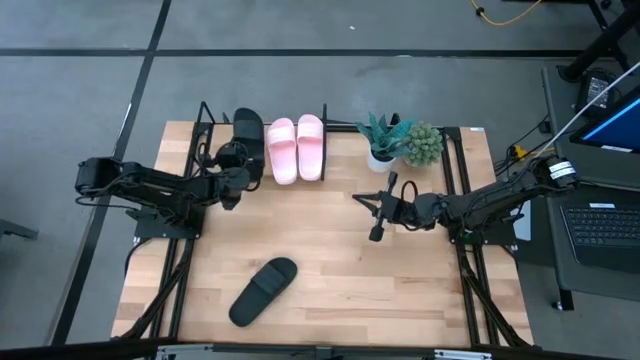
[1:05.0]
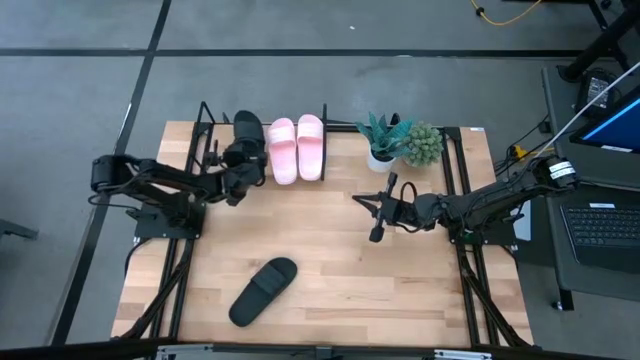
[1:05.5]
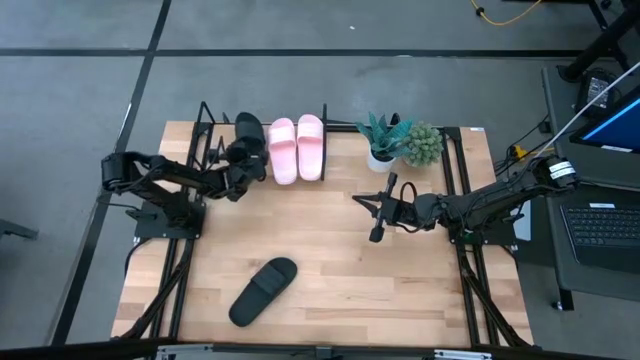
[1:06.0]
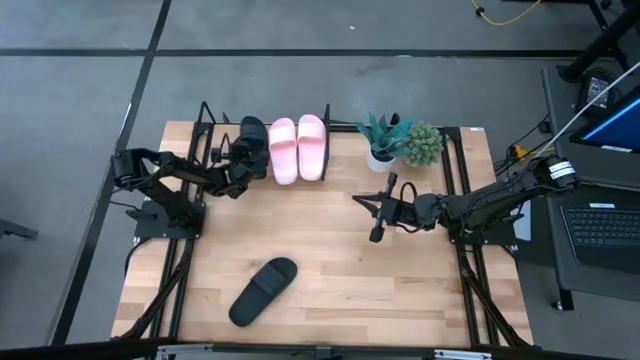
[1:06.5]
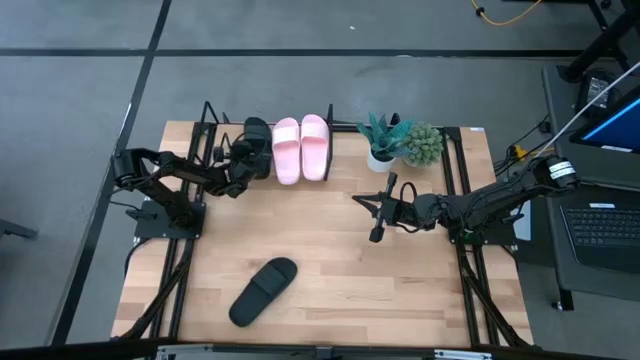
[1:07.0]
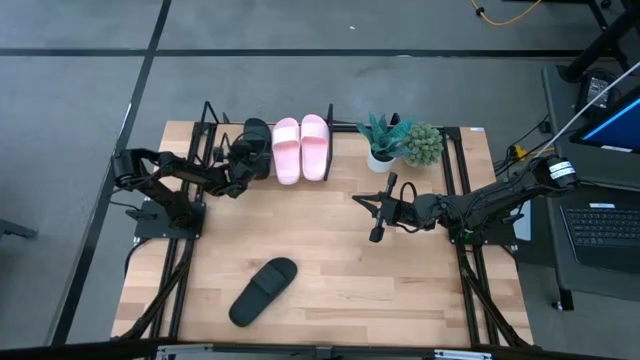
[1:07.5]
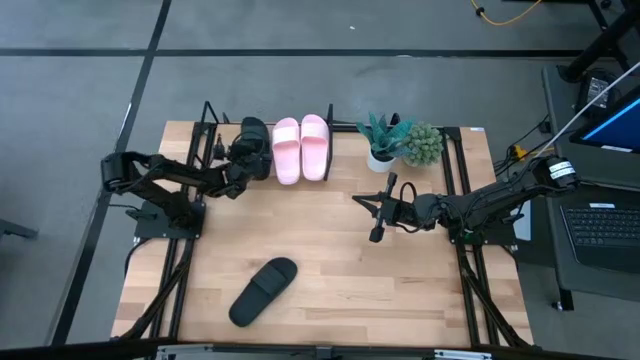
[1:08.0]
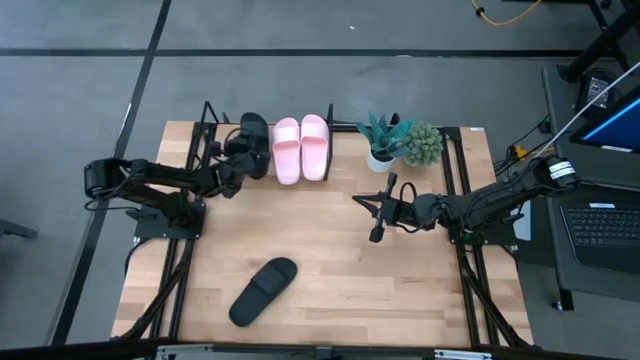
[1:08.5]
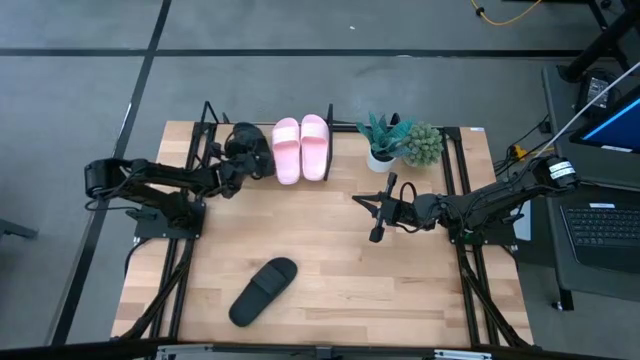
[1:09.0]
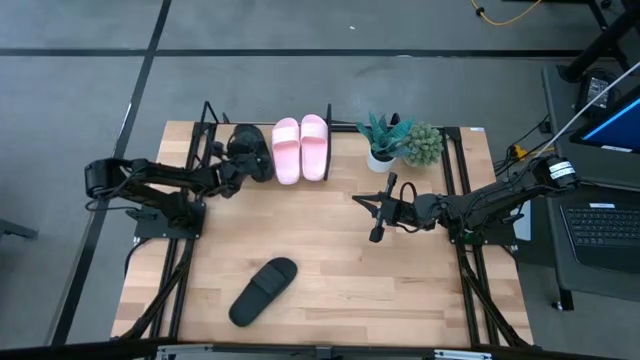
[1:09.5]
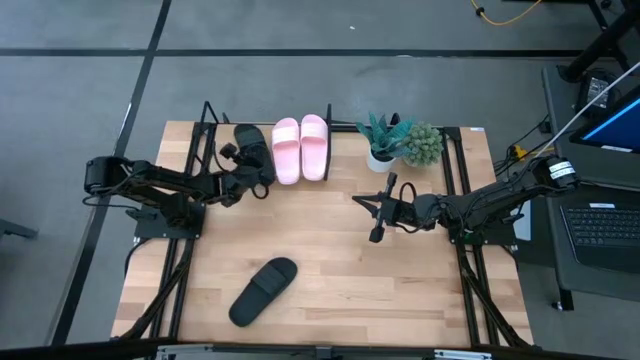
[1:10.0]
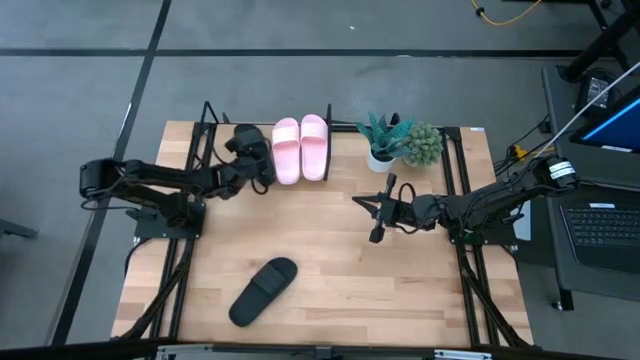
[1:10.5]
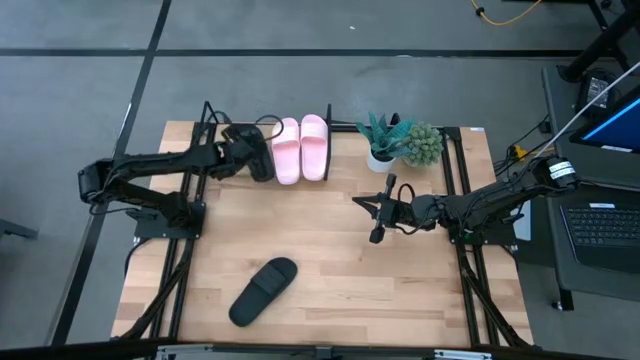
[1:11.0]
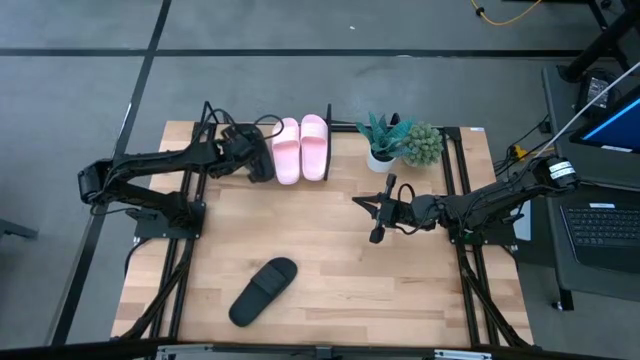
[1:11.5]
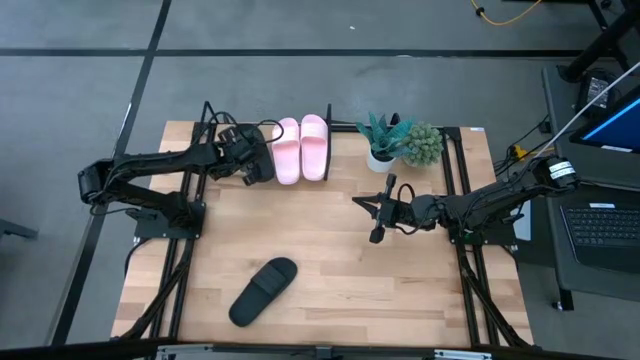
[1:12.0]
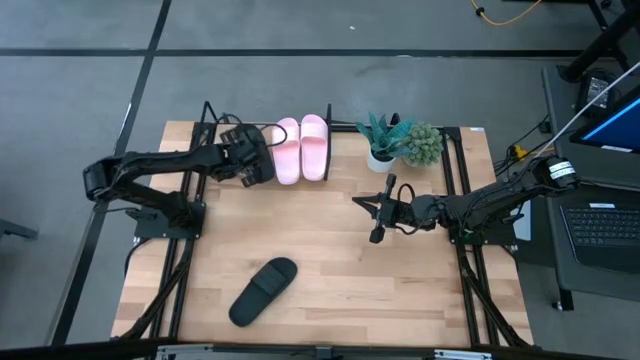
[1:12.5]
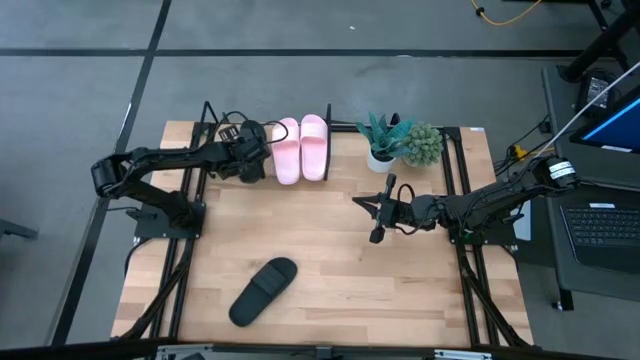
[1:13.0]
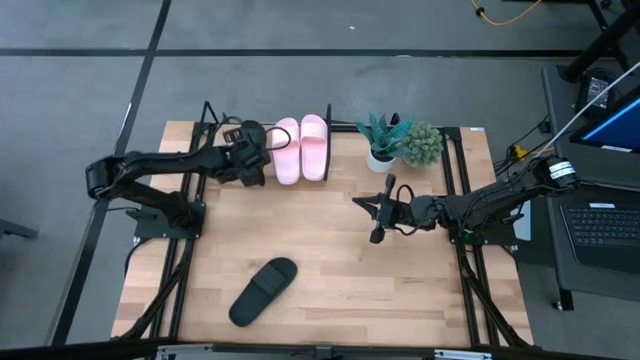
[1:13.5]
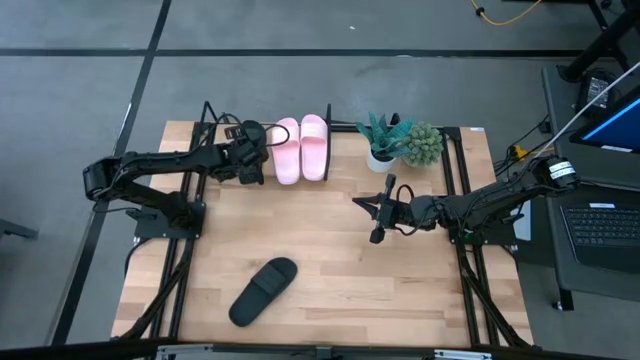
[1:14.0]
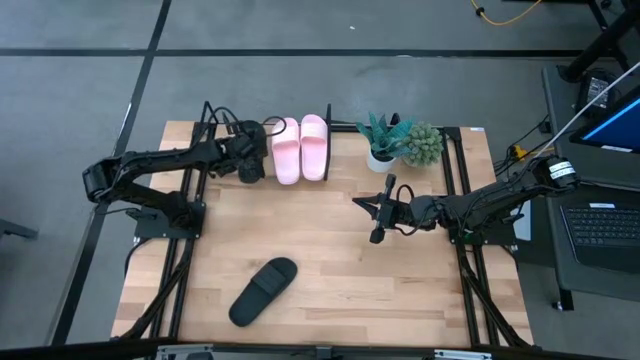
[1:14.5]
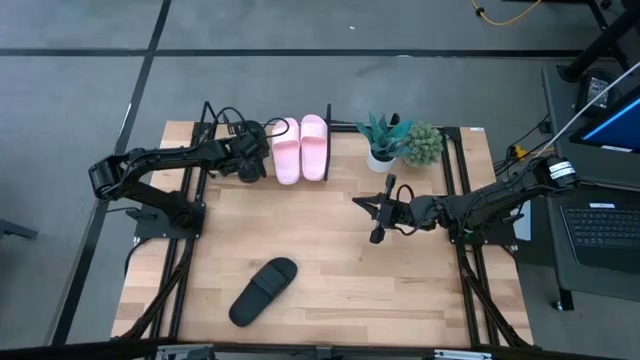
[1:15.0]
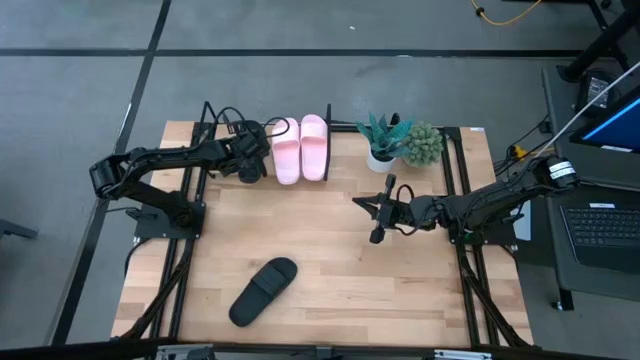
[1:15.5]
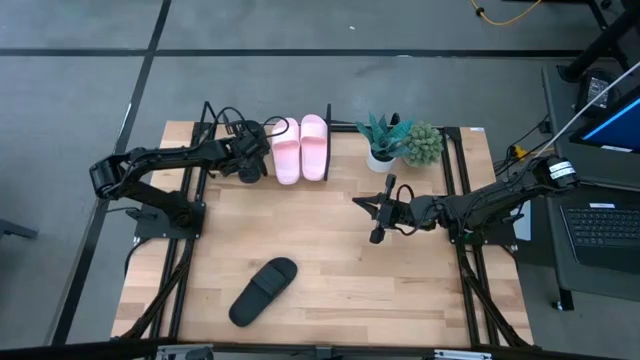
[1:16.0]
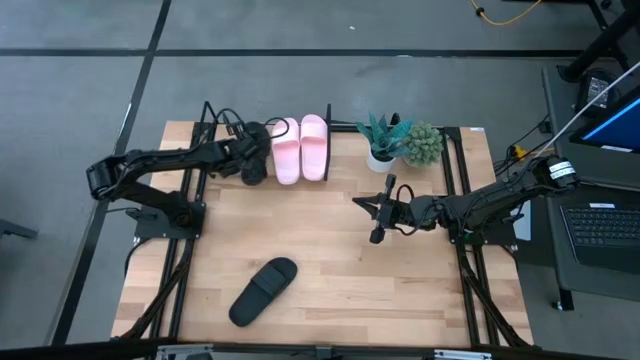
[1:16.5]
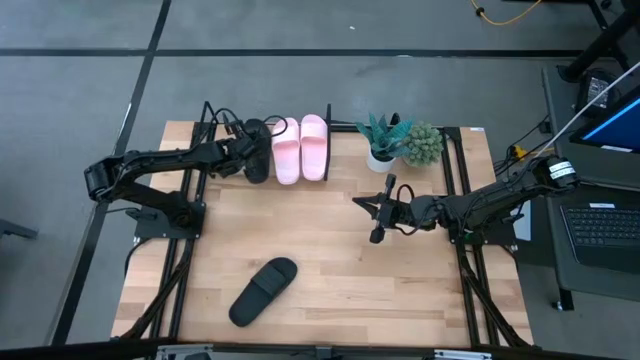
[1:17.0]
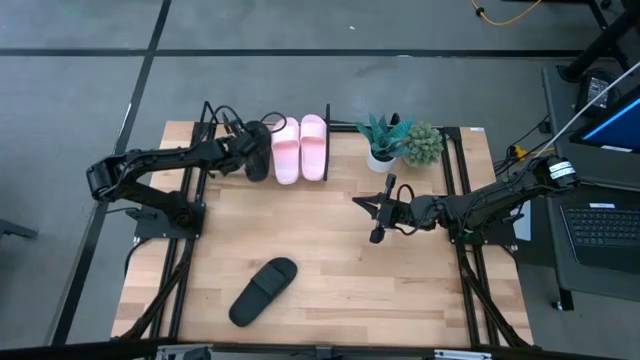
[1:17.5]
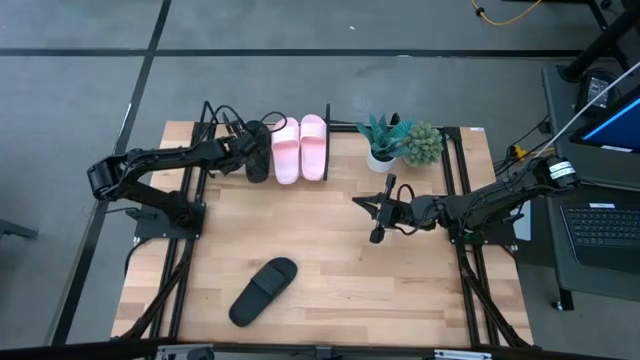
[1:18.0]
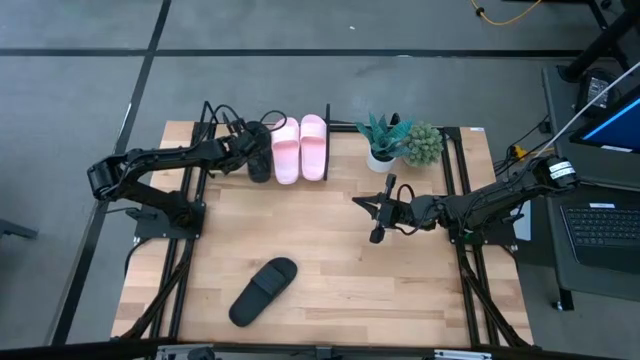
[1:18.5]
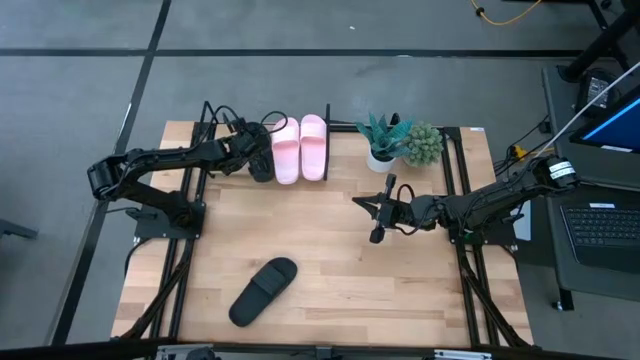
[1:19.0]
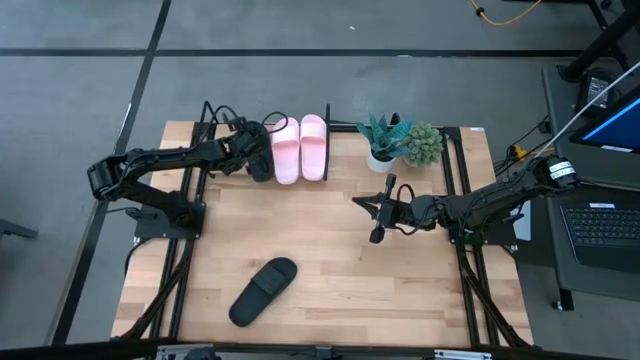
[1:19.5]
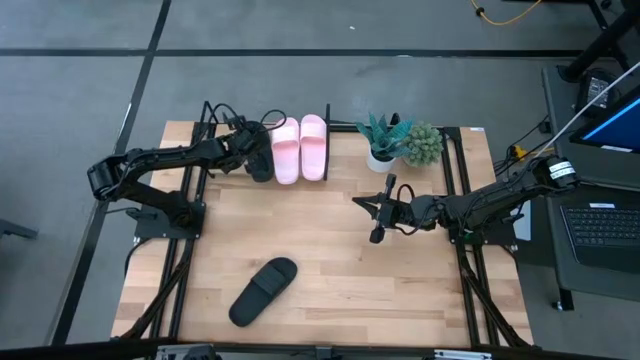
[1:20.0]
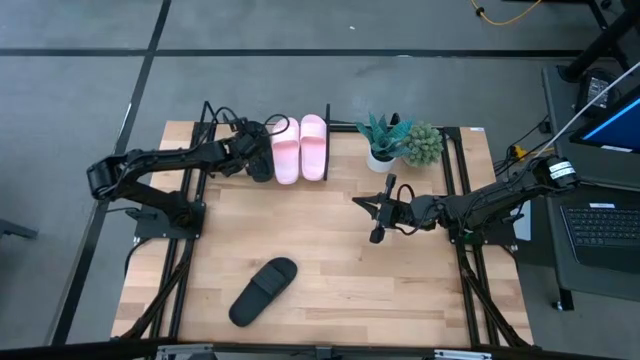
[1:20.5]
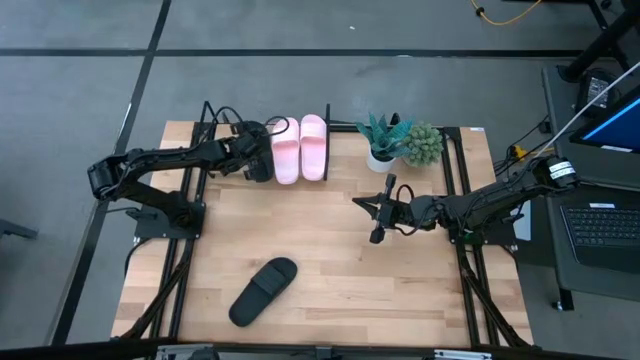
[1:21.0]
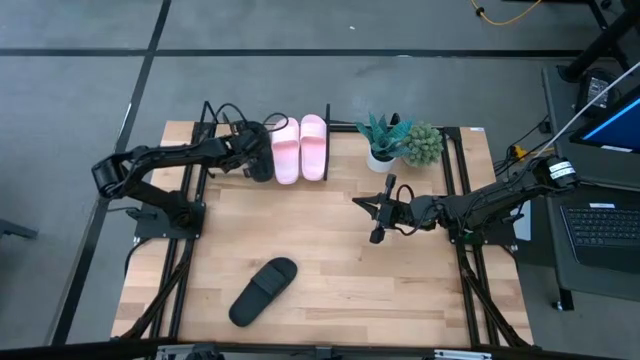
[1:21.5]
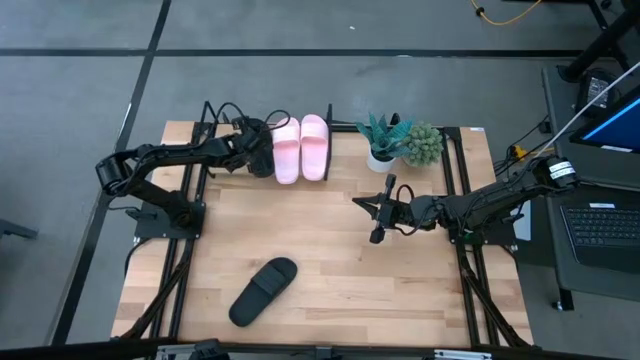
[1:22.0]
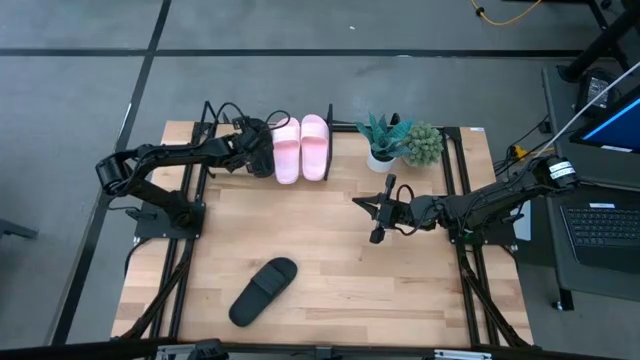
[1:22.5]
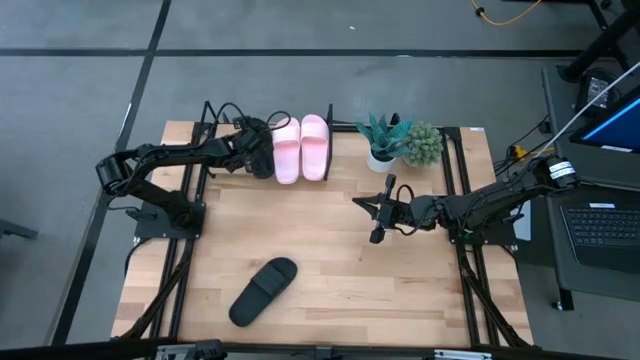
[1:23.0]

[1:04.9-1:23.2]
Task: Pick and place slides into the shelf
Put the right black slide on the shelf
